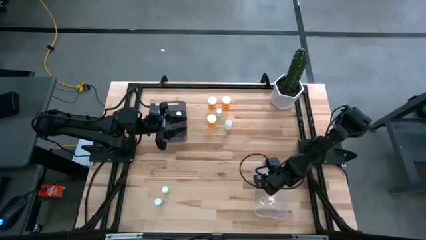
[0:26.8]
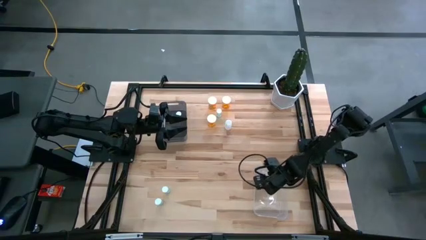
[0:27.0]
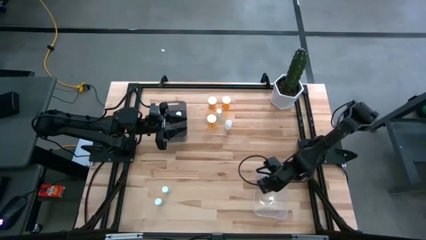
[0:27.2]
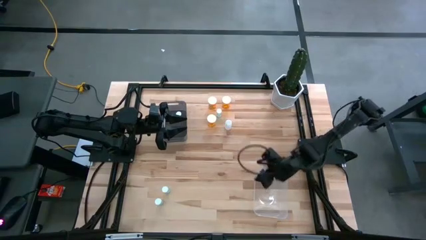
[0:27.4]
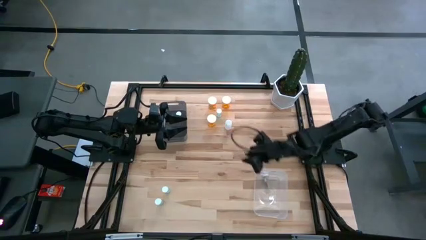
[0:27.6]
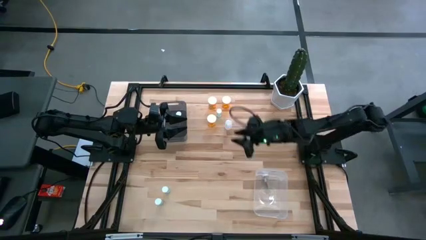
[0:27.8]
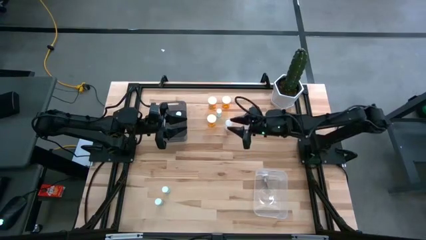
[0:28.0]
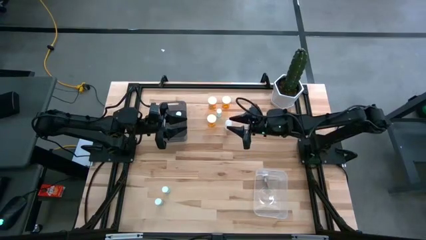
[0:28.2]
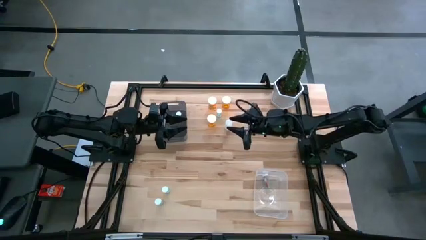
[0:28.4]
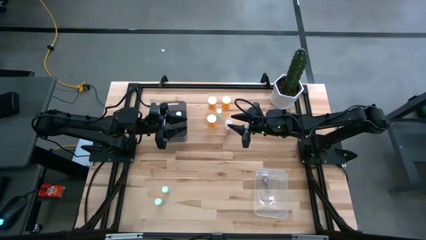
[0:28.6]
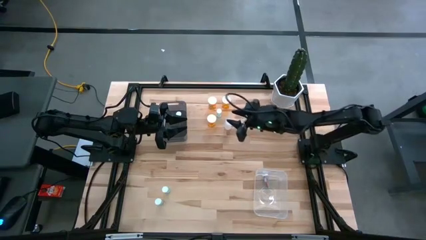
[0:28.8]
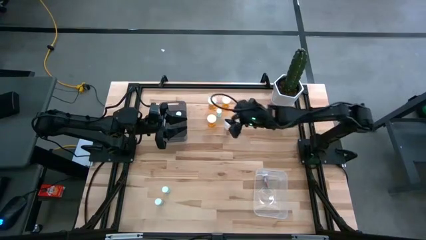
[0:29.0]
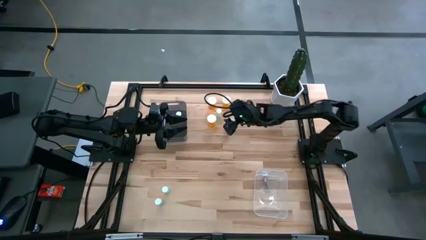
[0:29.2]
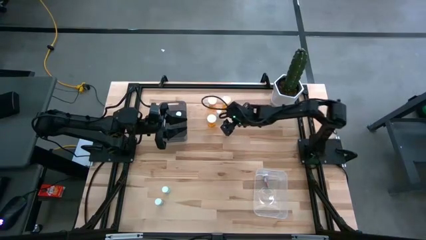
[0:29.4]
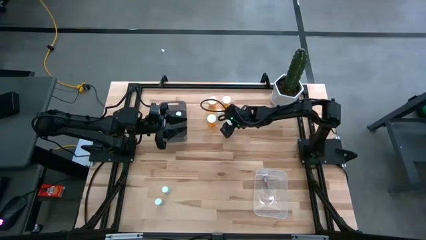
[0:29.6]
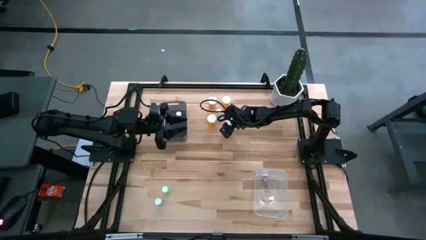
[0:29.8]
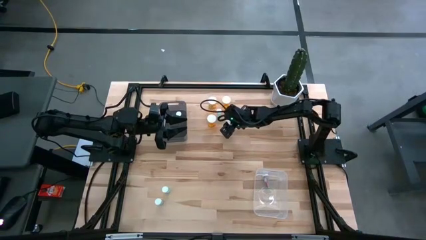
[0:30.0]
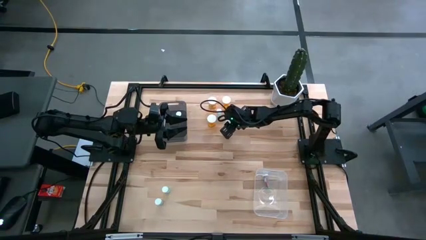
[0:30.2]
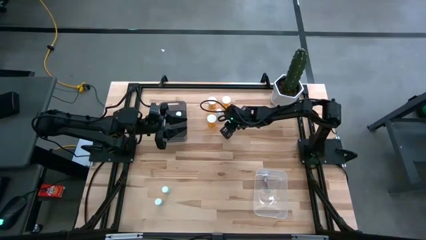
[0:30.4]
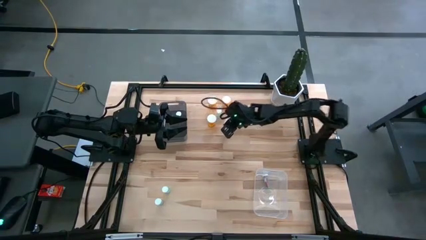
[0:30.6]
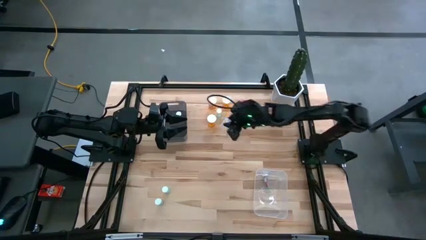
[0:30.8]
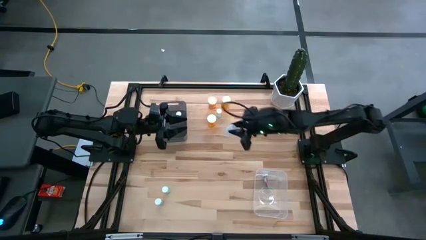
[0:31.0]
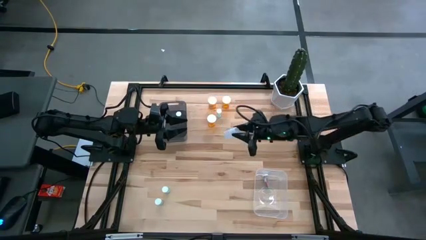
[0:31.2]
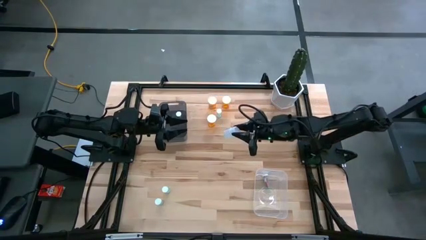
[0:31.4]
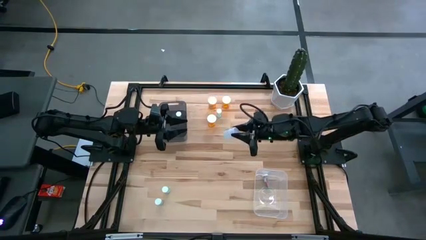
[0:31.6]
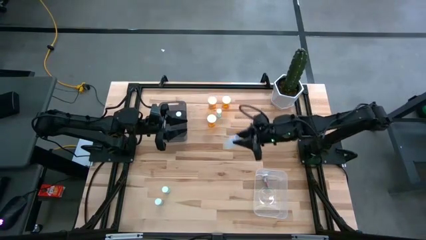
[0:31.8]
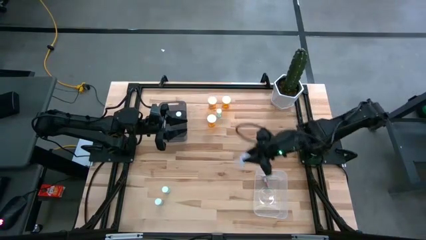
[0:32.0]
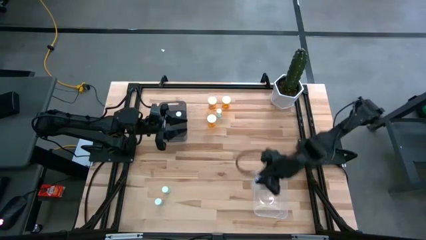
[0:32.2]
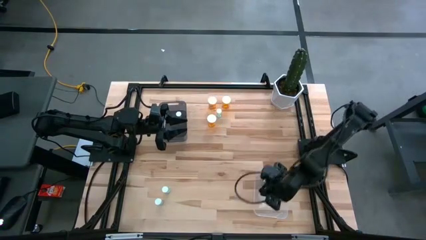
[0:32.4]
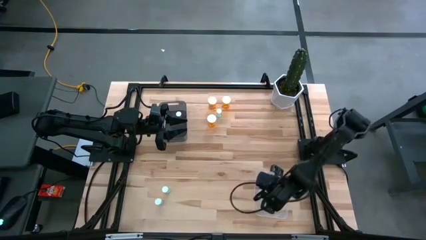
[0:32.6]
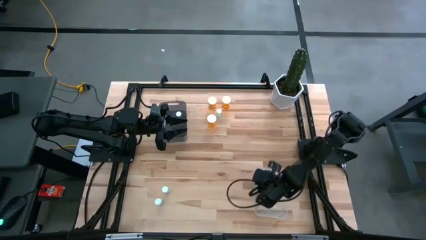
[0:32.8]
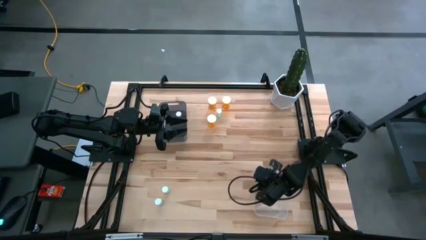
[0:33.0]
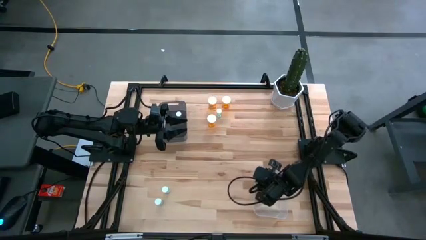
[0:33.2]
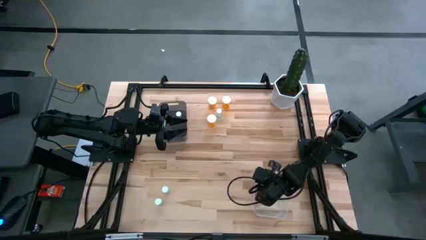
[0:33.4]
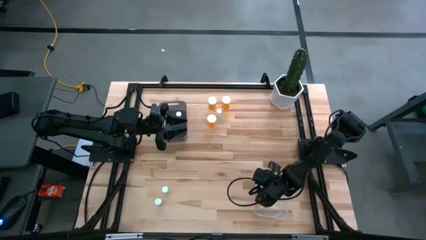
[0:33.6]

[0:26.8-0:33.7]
Task: Pick and place medicine bottles into bin by pill shape (circle, oval)
Put the small white medicine bottle into the transparent bin

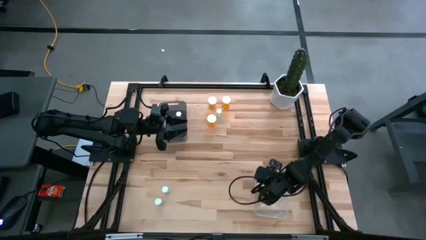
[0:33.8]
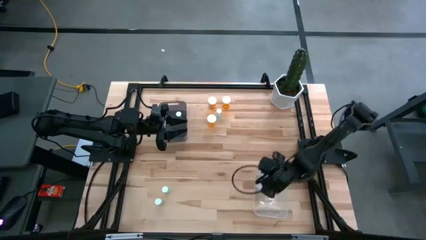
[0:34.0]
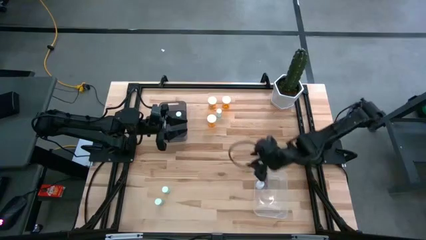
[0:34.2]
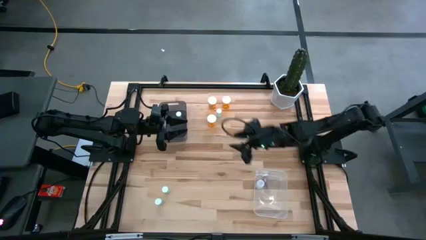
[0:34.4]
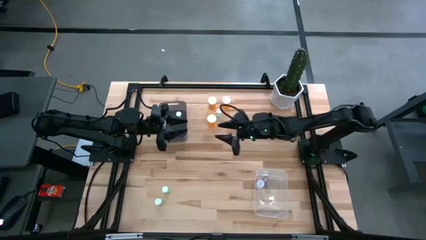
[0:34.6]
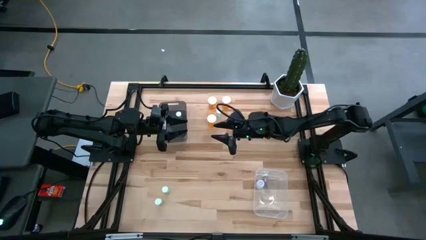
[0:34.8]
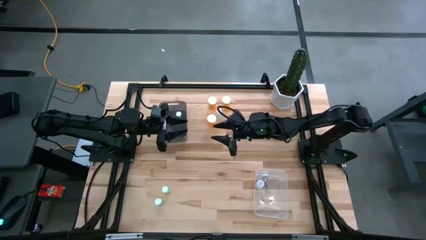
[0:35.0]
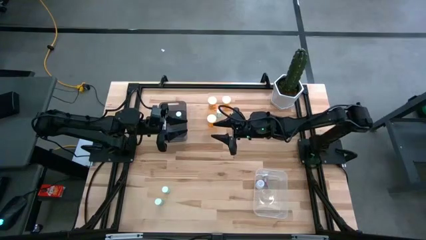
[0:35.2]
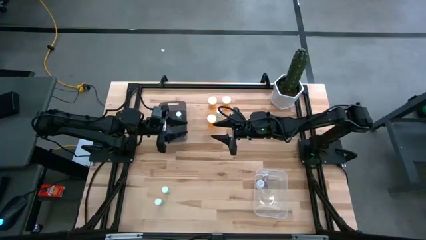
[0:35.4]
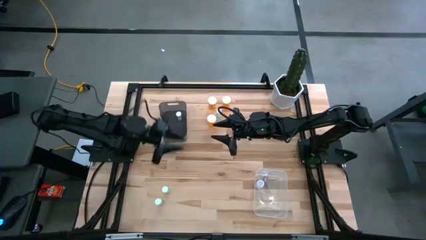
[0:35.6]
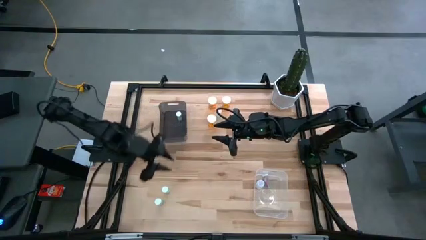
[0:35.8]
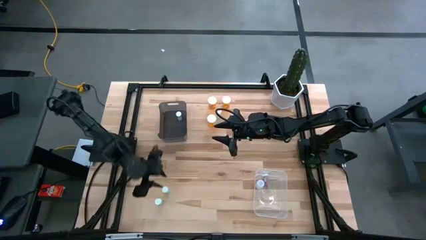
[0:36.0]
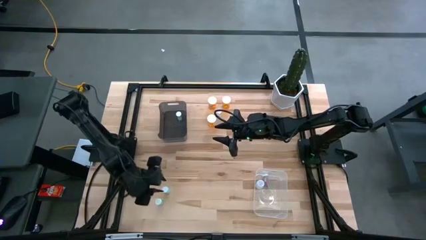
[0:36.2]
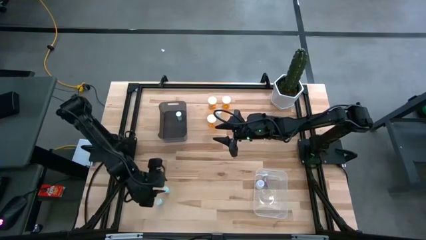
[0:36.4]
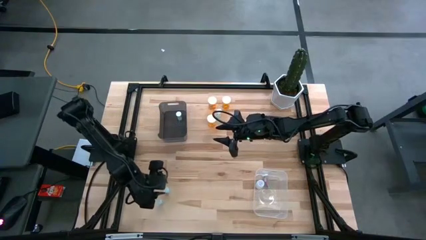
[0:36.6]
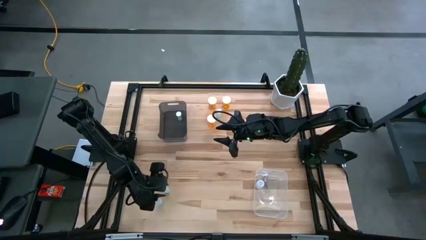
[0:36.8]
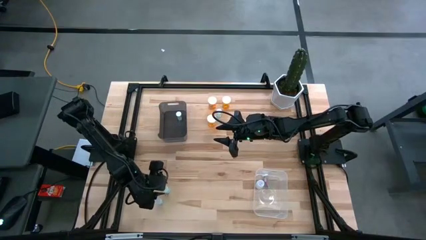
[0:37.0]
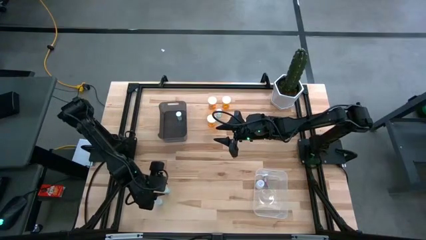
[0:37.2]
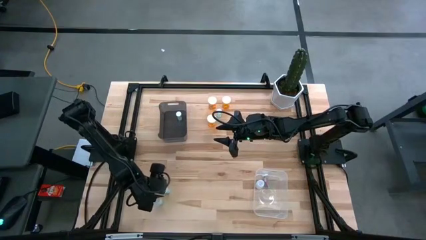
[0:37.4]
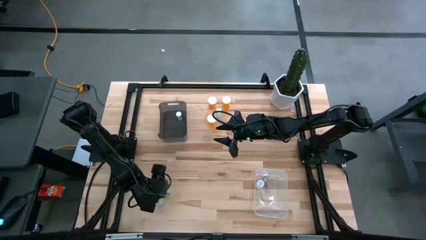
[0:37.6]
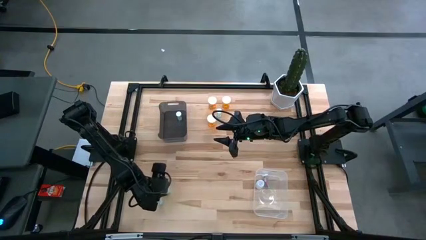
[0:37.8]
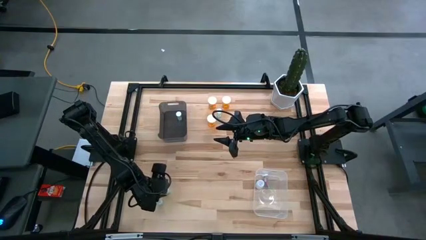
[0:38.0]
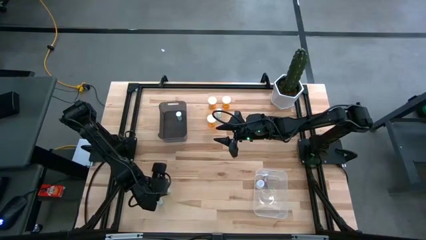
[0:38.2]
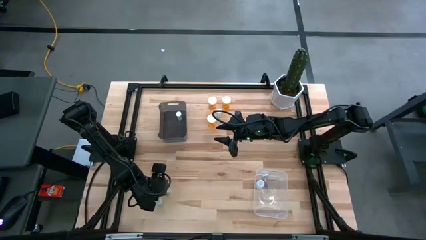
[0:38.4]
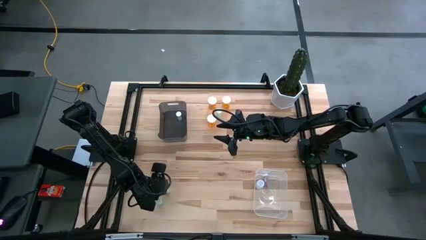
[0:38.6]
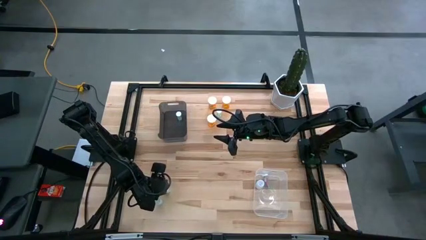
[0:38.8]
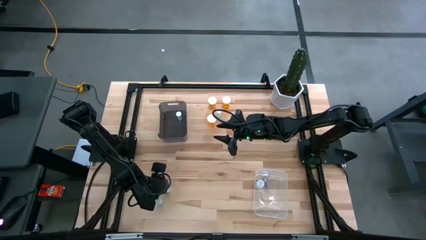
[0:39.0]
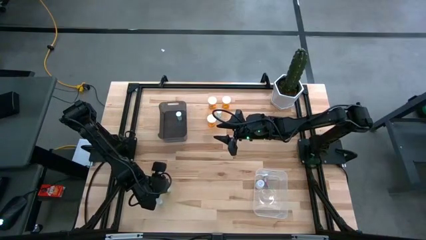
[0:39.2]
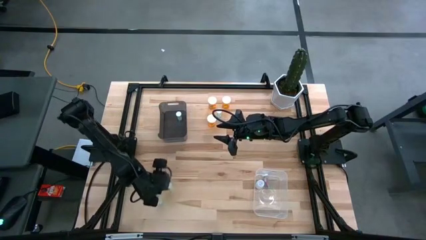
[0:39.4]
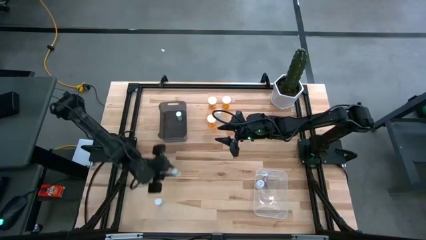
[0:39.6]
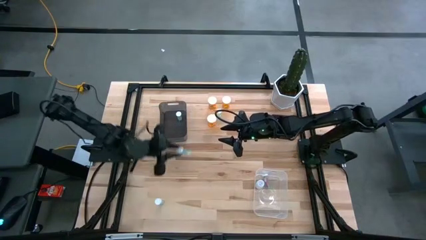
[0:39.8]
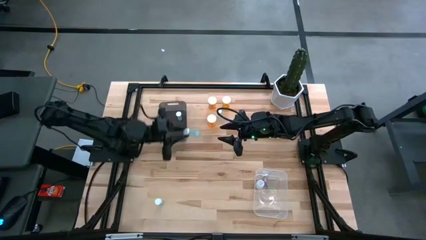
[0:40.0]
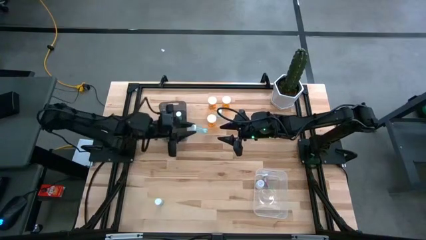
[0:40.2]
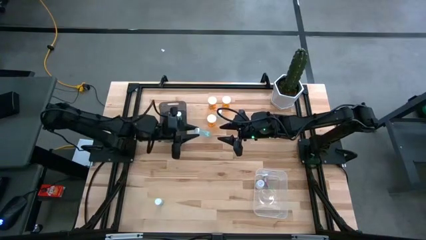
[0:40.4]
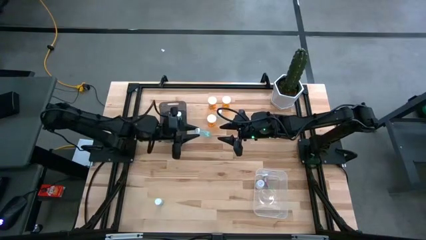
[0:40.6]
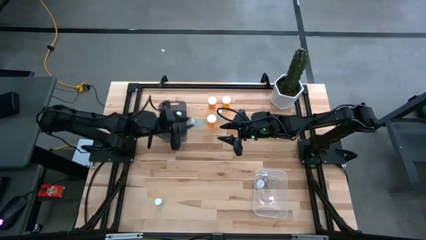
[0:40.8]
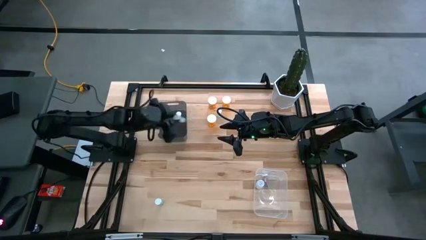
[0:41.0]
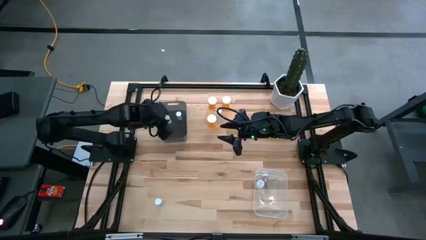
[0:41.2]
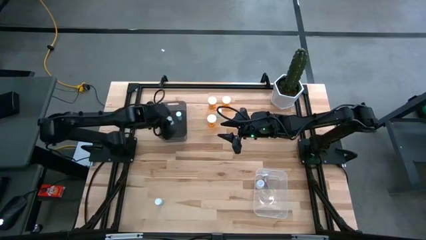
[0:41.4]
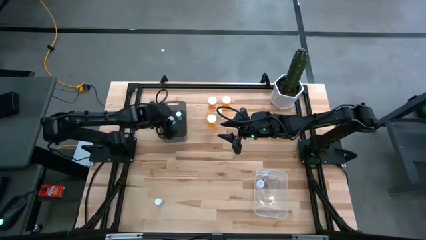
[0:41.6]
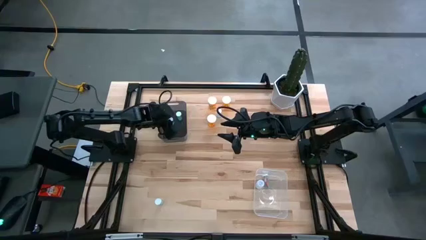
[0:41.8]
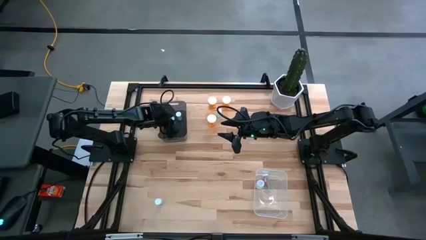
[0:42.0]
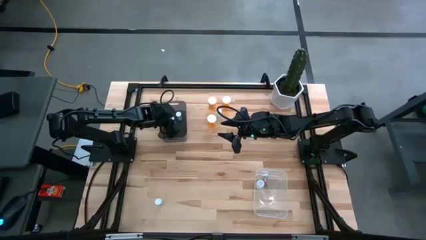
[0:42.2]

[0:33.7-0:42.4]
Put the blue small blue medicine bottle into the black bin
